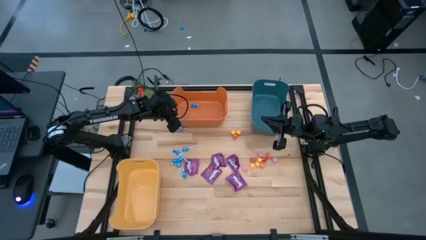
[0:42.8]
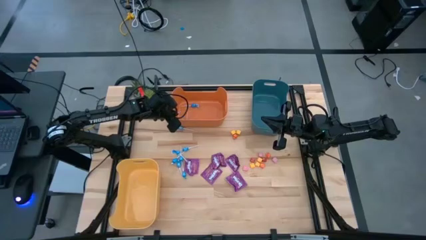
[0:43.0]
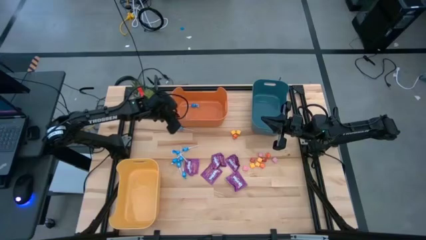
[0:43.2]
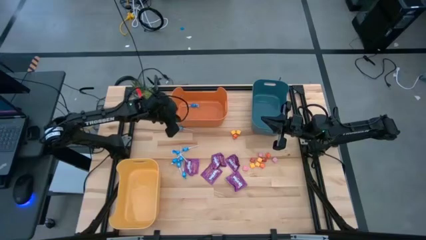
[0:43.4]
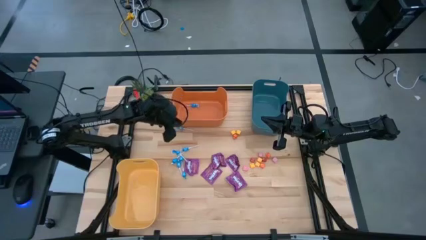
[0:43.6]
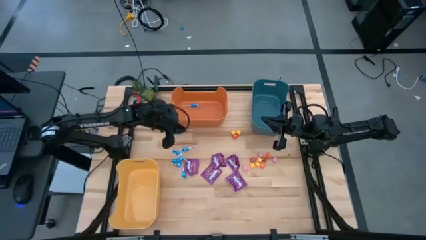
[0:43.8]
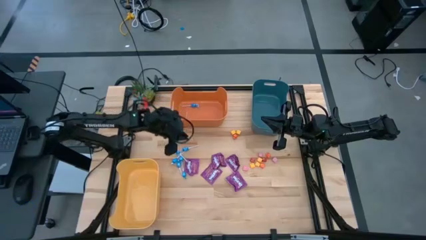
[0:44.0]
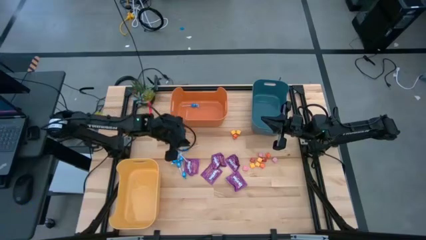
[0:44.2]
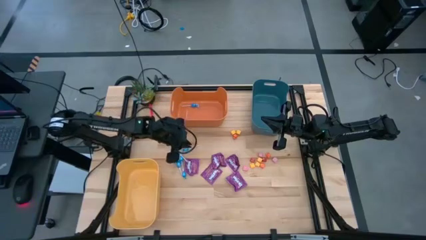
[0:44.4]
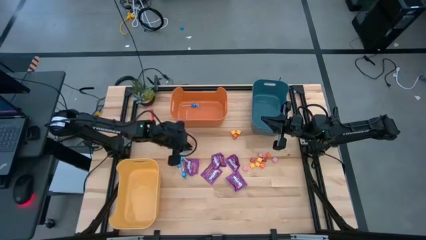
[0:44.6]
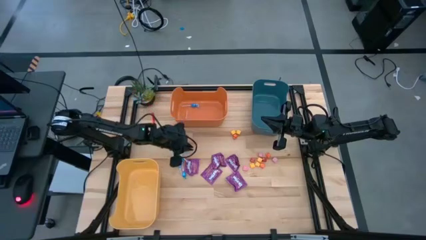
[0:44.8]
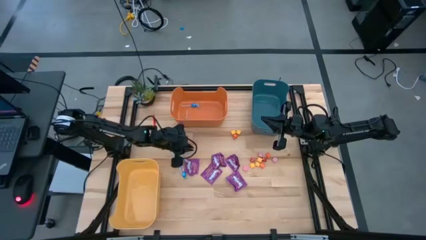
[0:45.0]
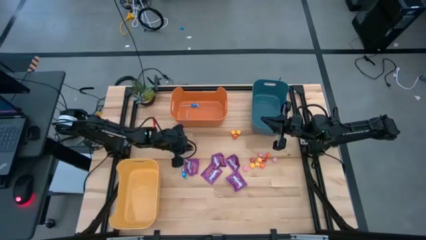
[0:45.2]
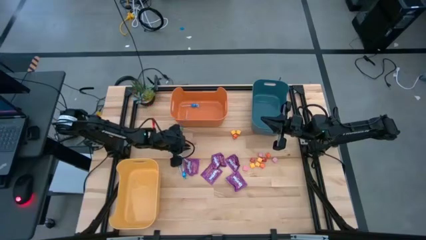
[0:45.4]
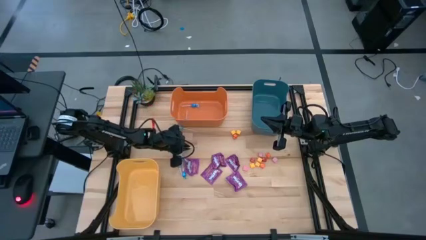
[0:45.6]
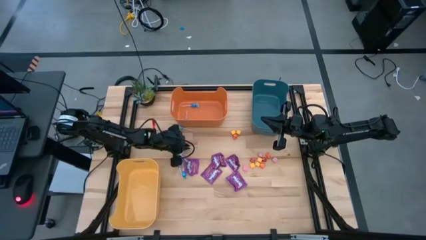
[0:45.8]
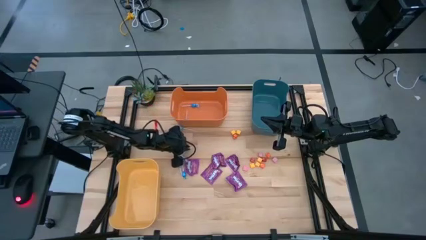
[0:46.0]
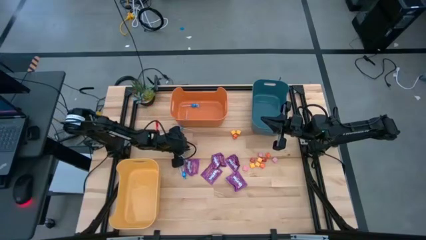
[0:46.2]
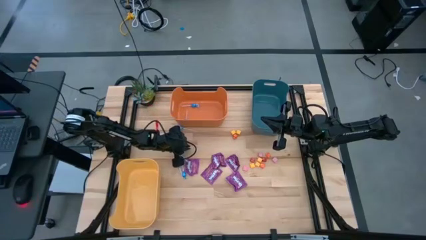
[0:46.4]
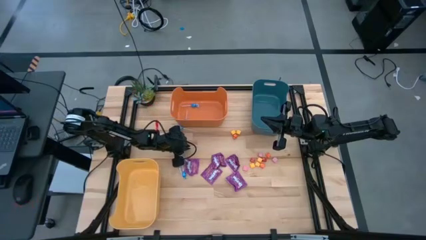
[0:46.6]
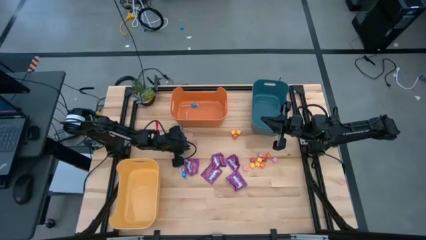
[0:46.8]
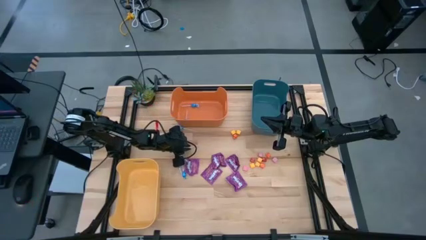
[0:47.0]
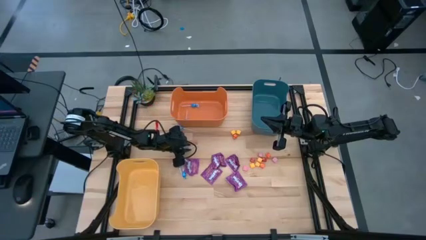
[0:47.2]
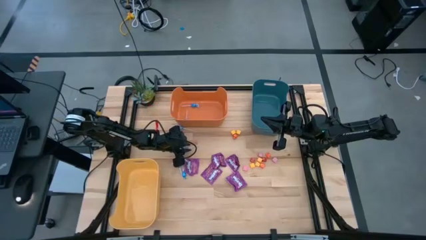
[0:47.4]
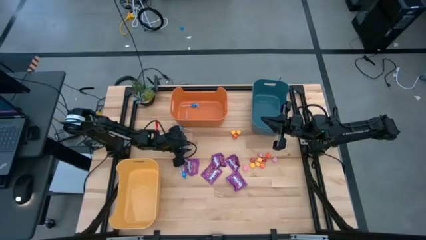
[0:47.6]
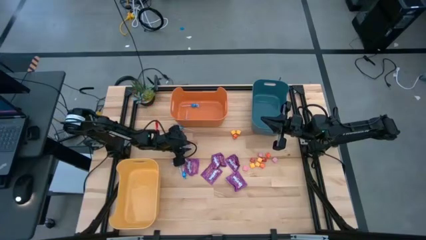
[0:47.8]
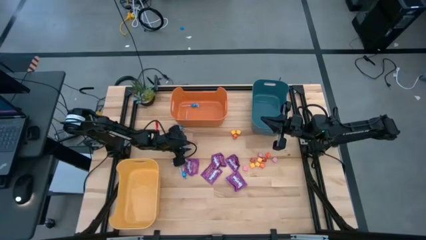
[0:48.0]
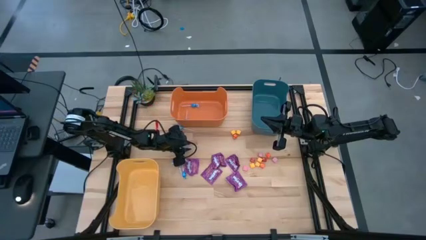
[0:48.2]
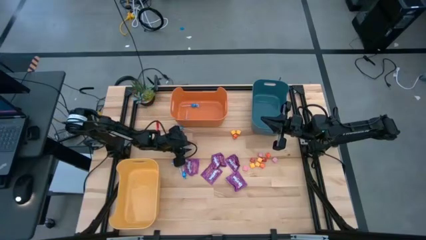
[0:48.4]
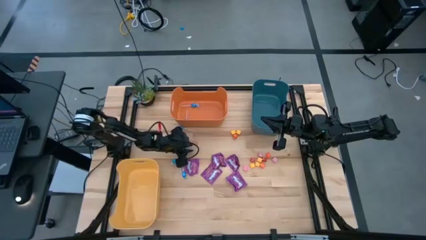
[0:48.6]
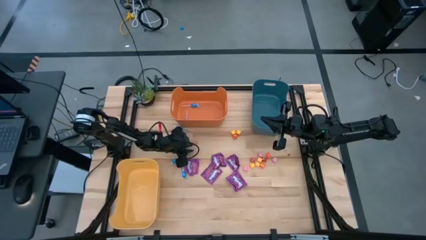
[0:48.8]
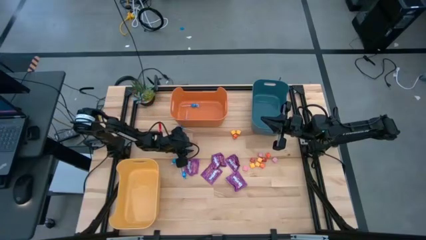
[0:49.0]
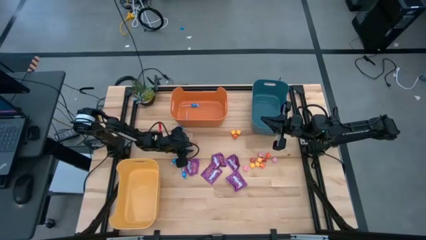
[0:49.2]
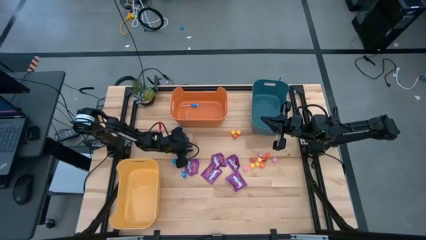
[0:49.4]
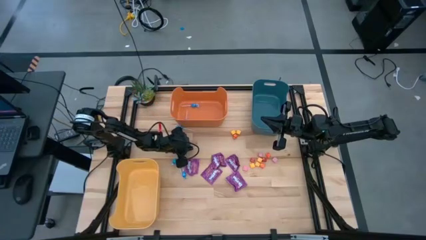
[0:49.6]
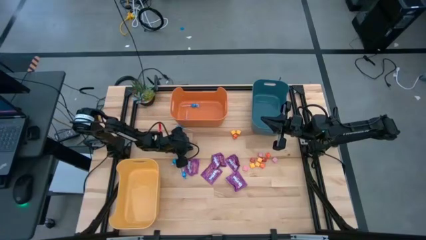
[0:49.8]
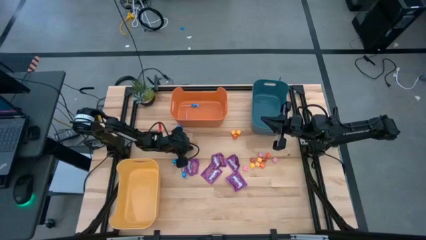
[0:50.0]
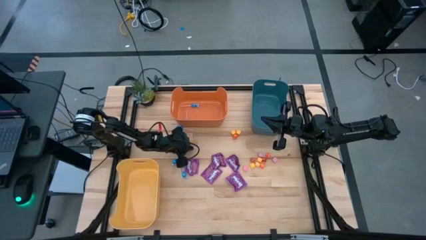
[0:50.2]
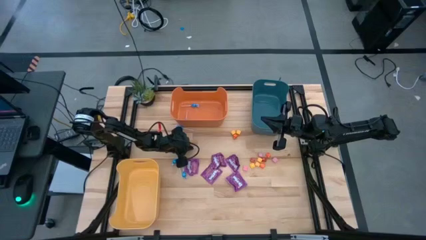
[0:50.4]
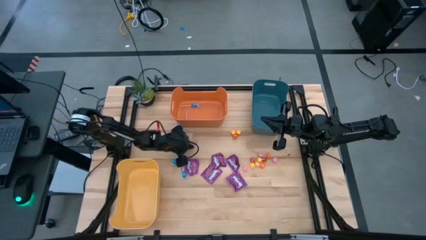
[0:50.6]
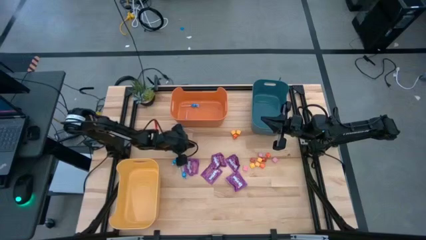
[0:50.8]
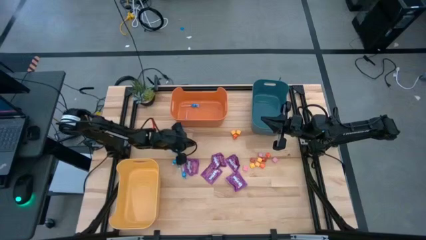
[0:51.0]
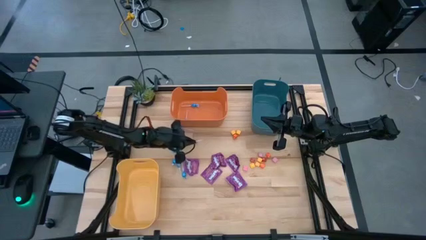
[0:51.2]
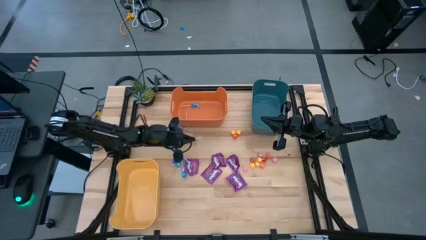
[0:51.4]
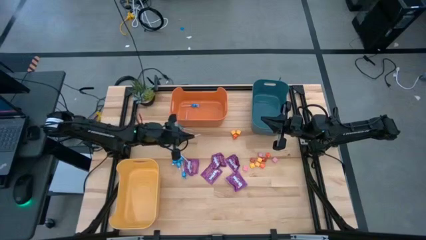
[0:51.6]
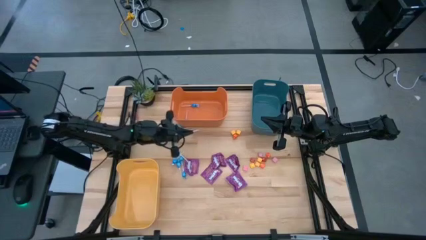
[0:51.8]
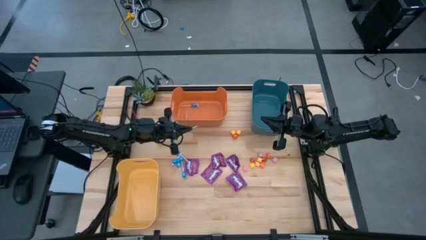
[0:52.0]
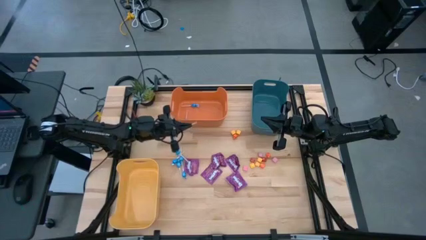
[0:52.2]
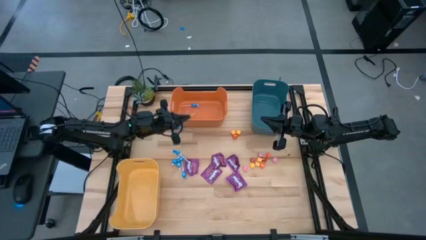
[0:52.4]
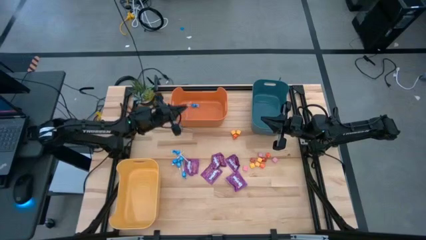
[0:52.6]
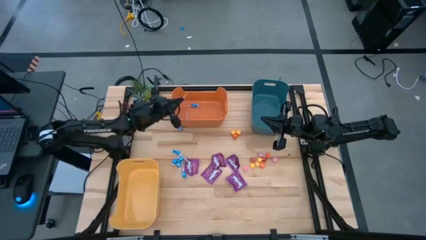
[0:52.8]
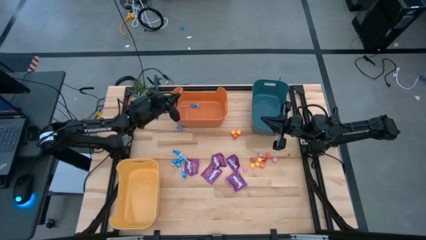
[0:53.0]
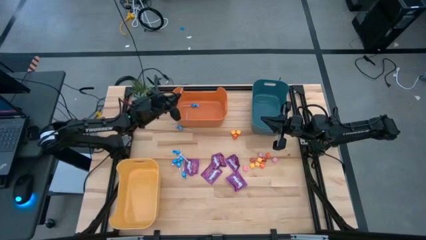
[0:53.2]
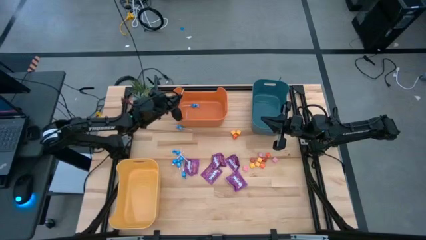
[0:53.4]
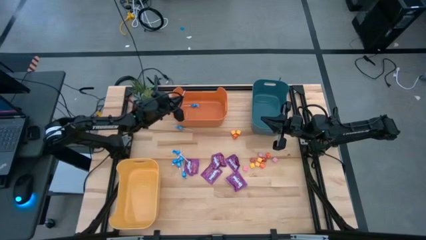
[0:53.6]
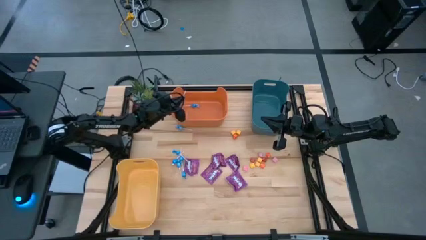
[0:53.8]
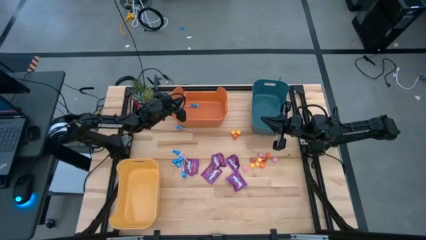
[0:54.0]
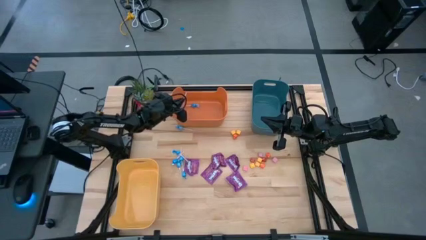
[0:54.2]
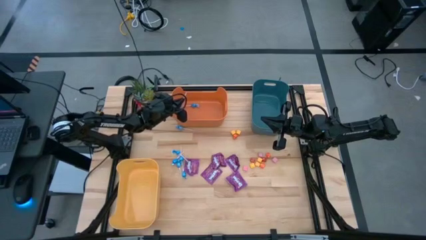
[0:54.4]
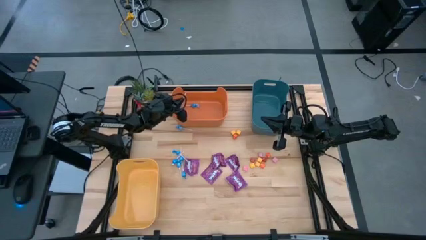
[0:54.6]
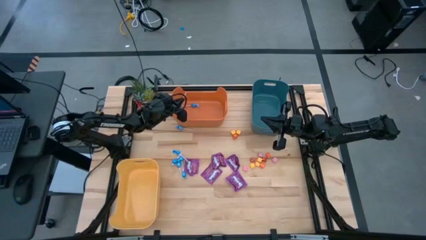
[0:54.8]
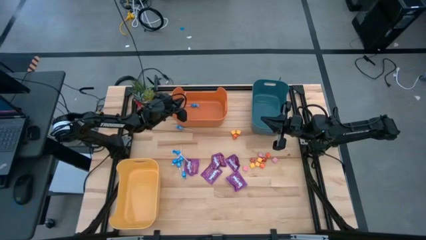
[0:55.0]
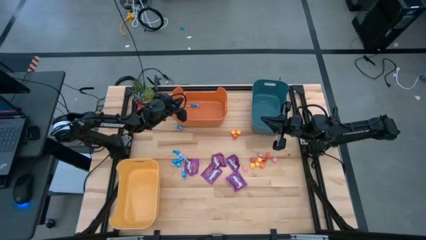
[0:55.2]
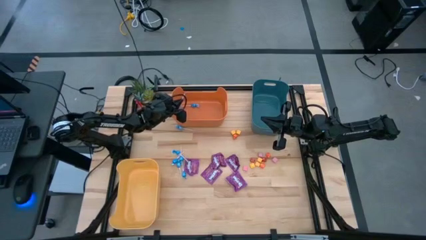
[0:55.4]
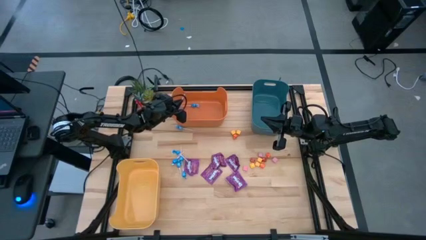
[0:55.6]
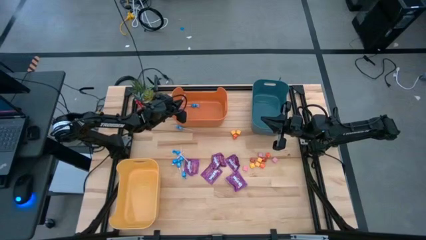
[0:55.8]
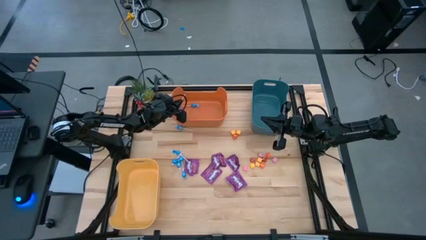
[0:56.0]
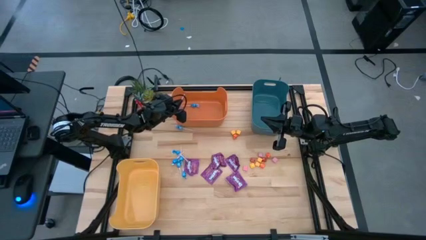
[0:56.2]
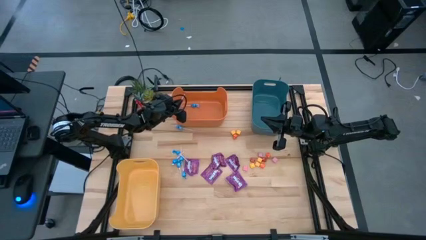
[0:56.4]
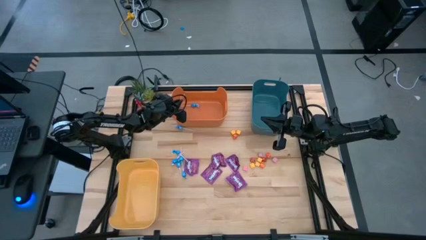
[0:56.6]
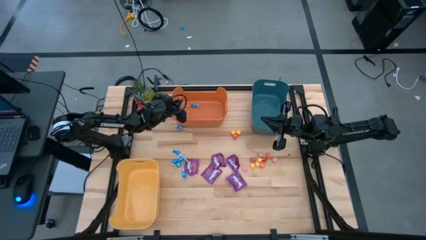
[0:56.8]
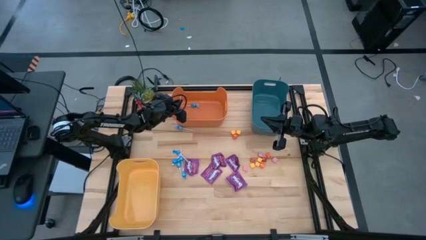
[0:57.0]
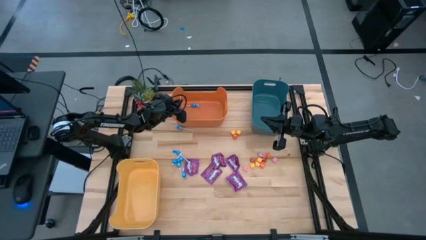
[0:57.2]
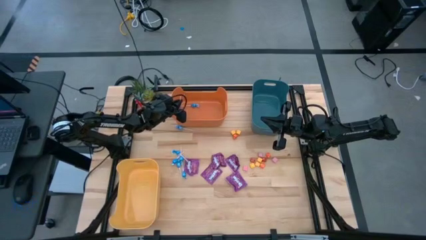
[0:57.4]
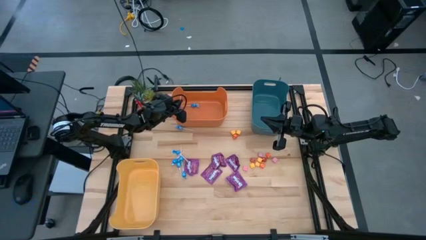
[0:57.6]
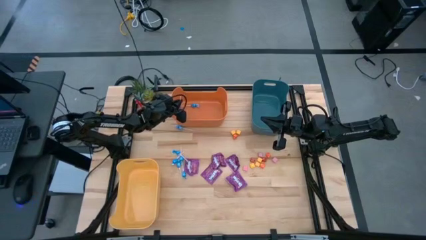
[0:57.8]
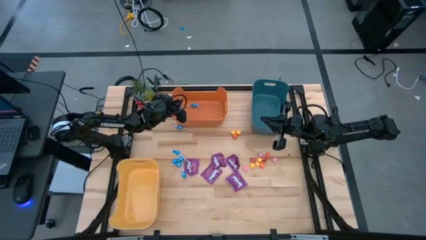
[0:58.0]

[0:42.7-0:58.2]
Task: Sort candy
Put the blue candy into the orange bin

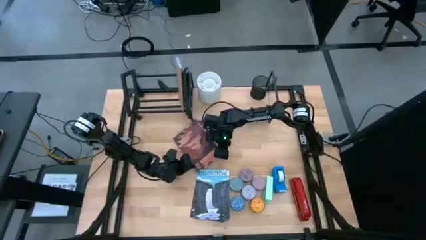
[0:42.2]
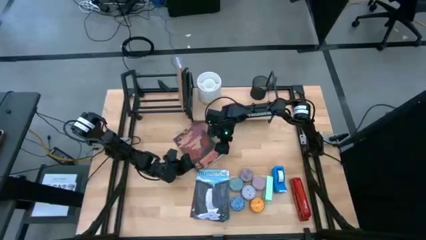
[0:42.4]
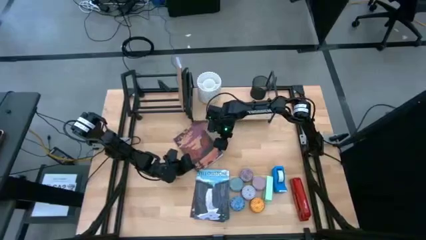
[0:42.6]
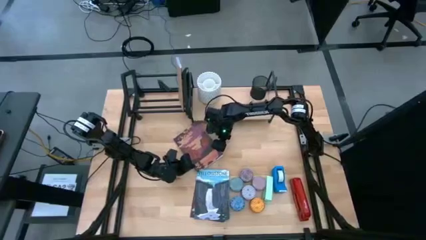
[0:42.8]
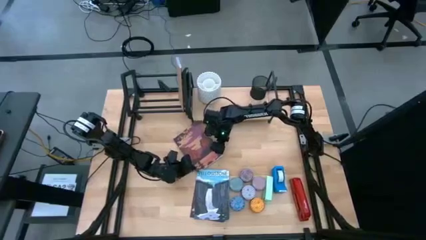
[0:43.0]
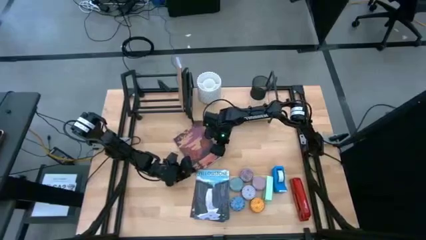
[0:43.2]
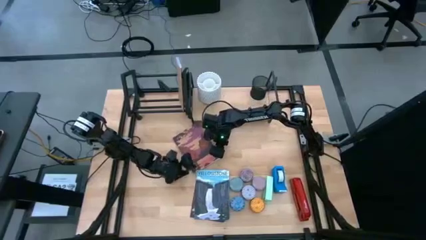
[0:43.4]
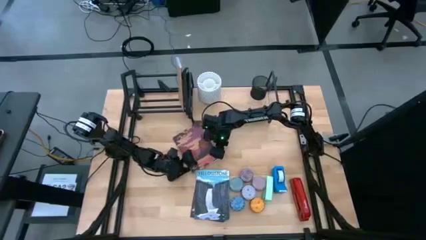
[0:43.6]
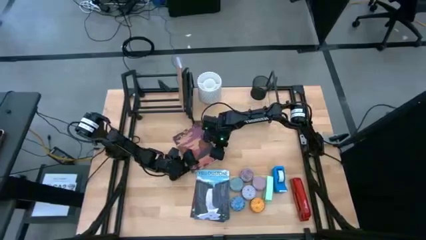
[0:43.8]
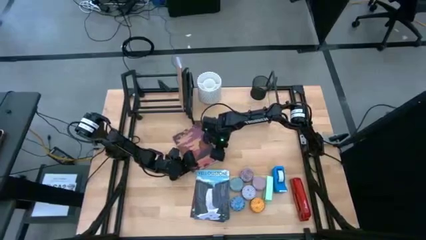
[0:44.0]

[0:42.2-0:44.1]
Task: Stock shelves
Put the brown book on the bookshelf
